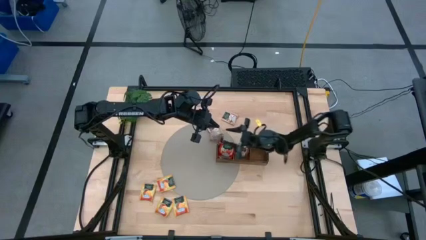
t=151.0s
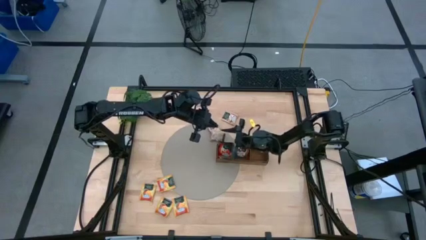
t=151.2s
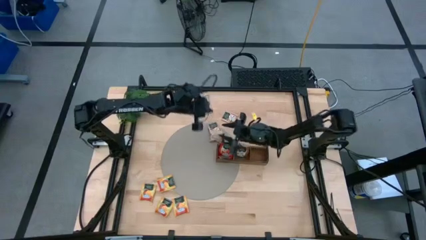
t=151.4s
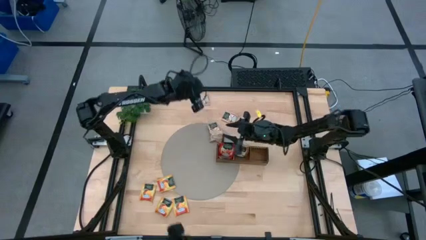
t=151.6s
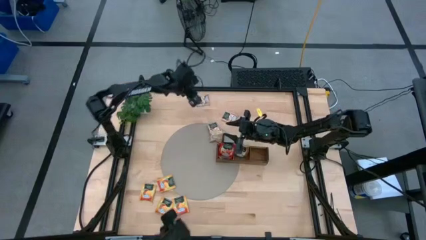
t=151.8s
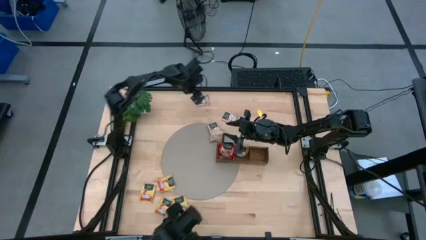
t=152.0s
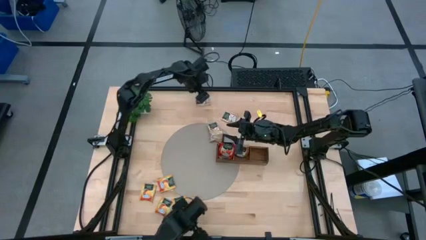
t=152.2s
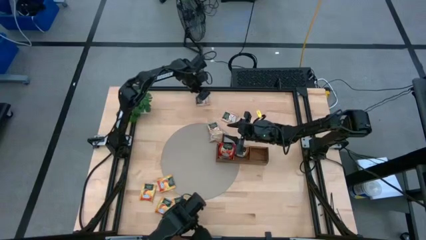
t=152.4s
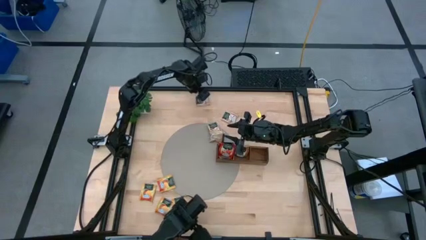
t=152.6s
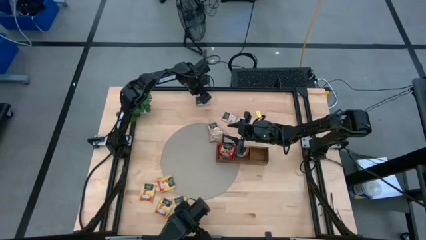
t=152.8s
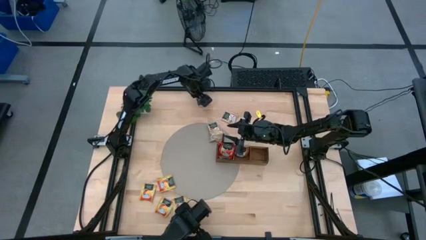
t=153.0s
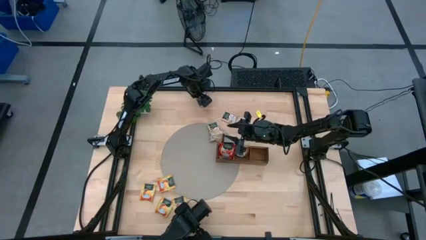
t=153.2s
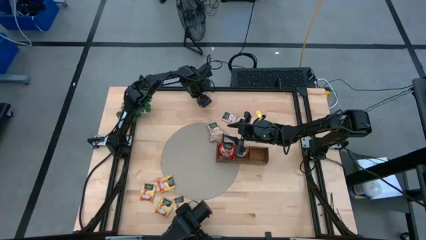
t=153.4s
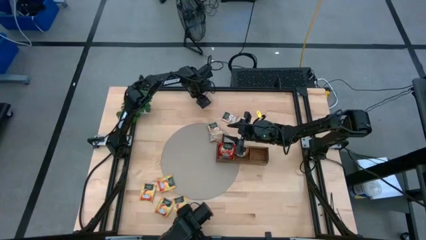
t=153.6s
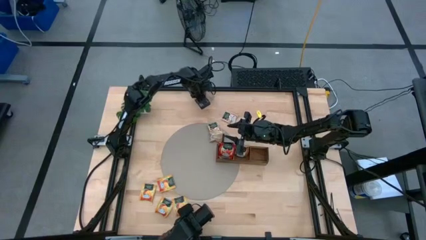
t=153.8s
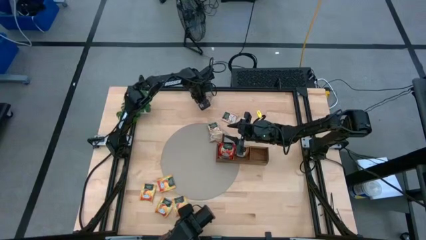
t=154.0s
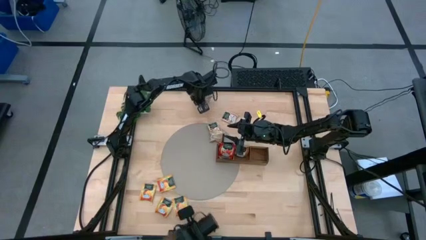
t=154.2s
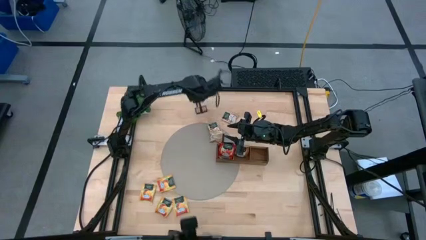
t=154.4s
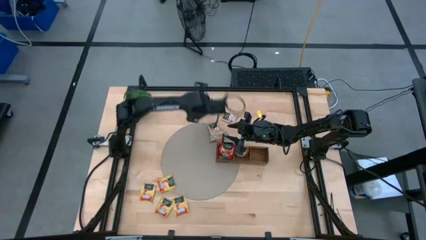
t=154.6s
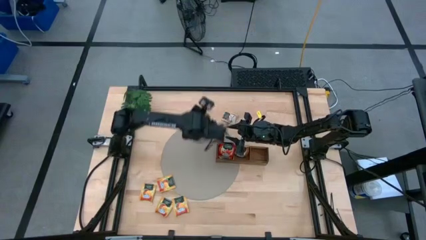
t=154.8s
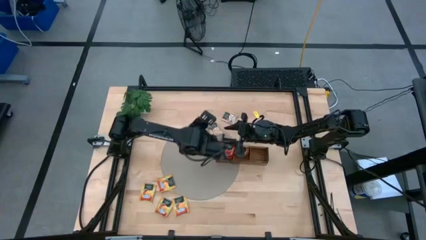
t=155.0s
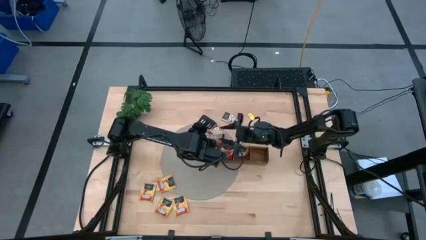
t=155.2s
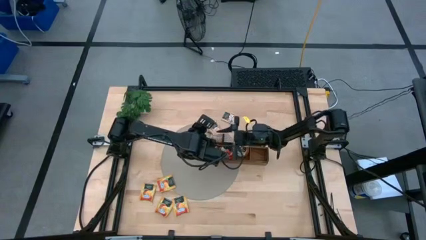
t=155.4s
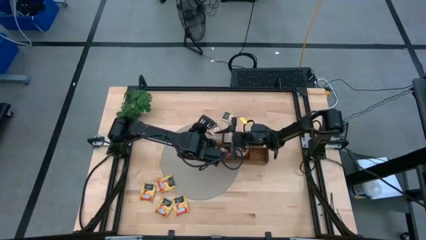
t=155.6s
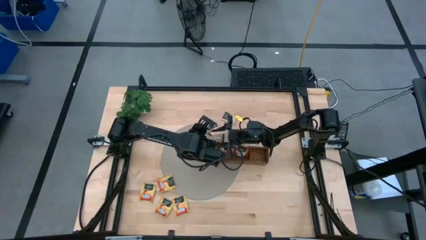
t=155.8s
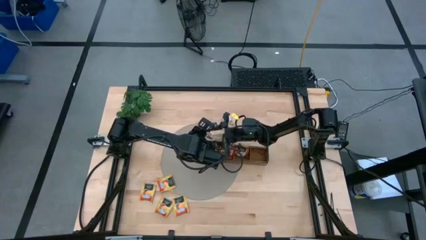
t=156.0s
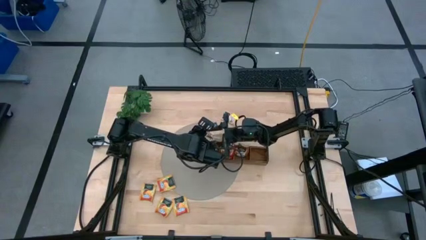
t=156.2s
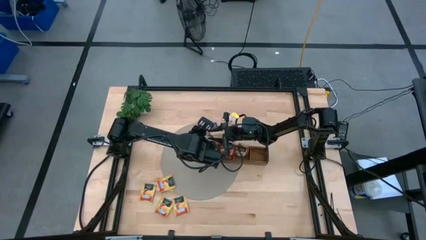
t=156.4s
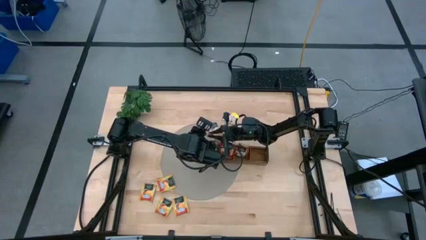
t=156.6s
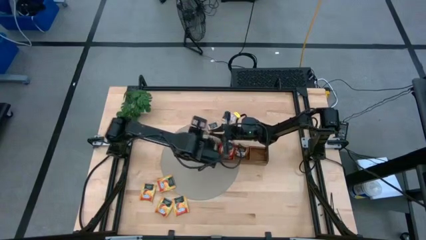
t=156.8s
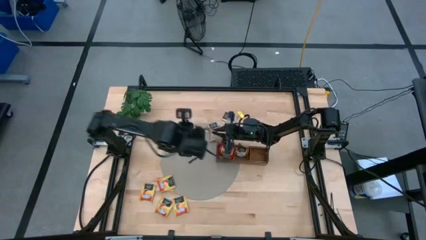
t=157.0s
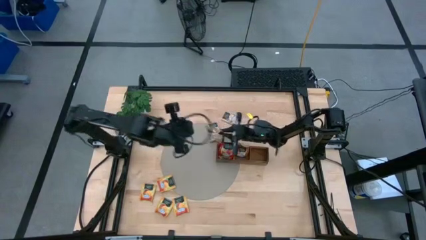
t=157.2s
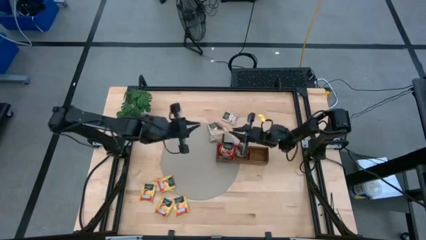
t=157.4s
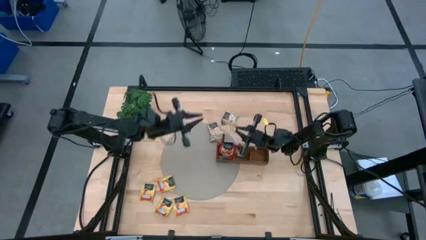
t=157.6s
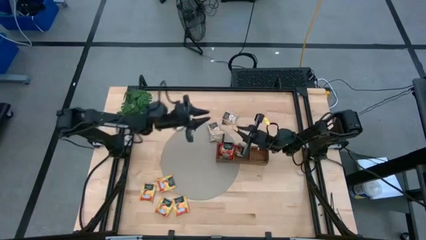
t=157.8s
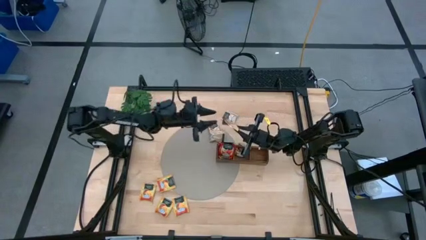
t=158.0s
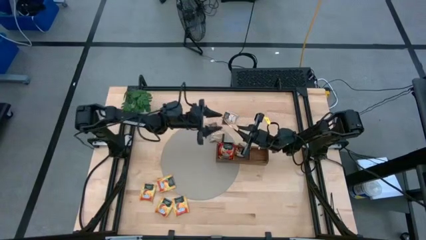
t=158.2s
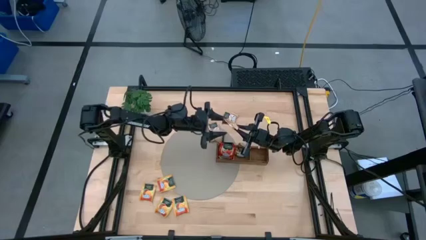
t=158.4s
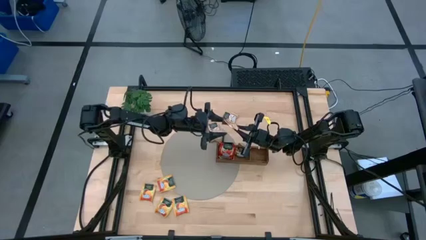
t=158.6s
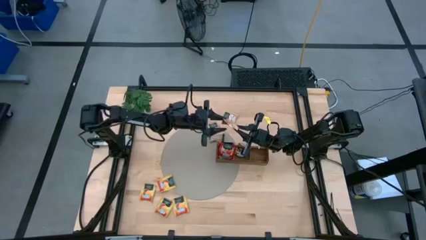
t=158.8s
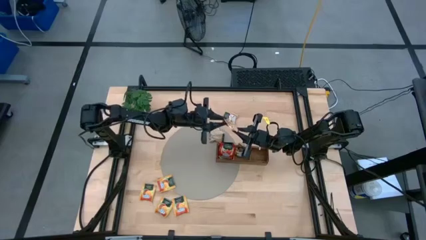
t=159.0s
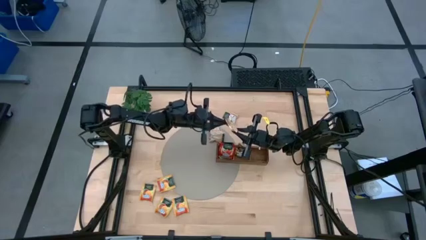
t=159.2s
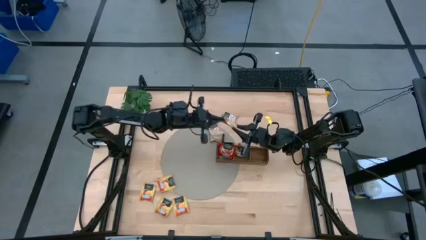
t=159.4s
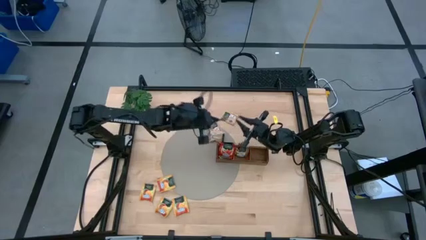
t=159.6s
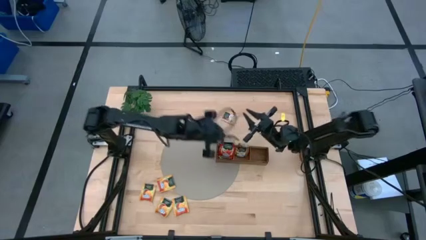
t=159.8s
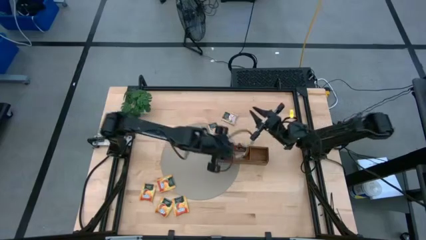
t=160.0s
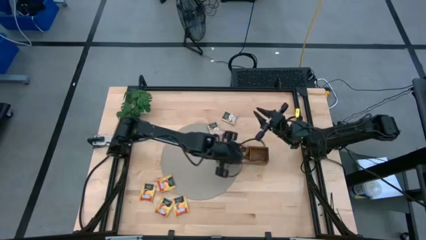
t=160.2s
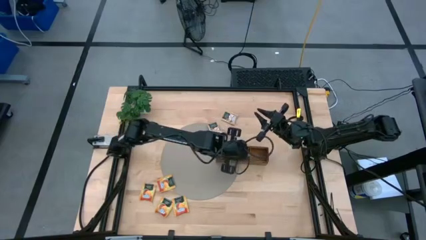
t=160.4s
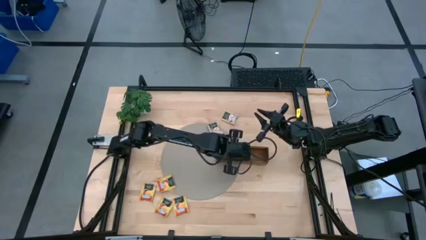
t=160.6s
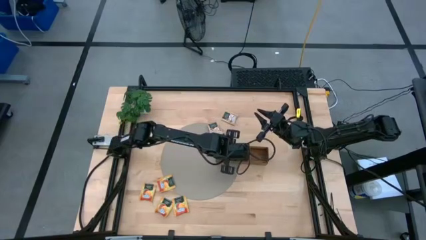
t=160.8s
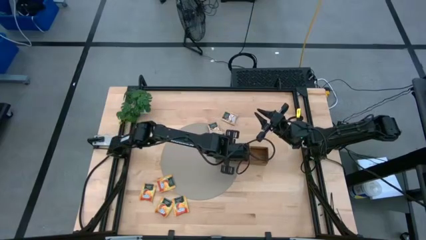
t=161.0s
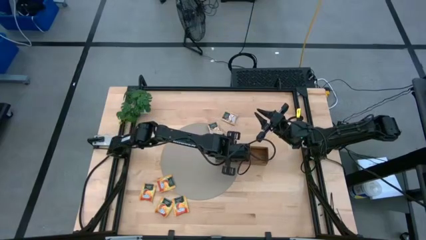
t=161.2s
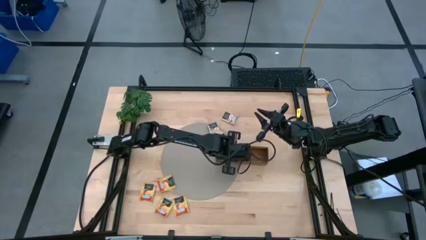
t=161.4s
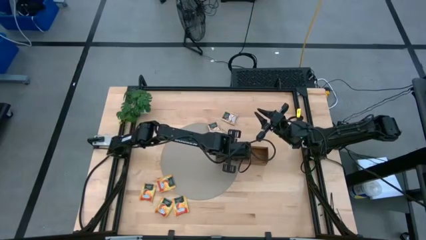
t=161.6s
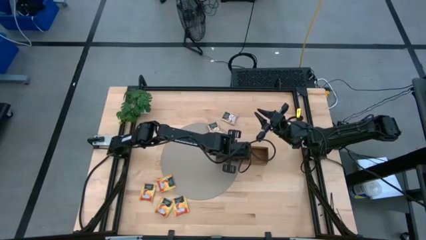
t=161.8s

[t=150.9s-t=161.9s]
Task: Pick & Place Tea
Put the brown tea bag into the middle section of the wooden organizer

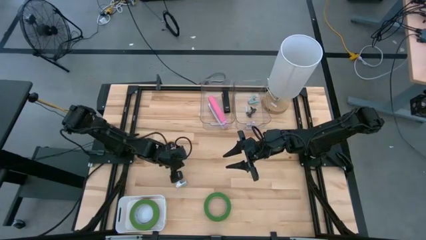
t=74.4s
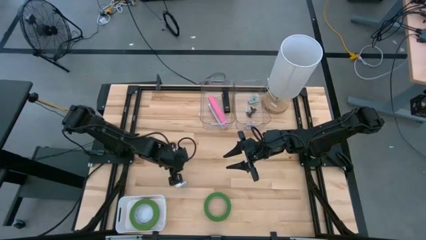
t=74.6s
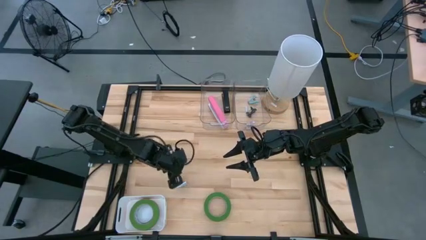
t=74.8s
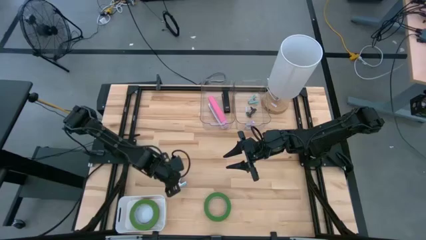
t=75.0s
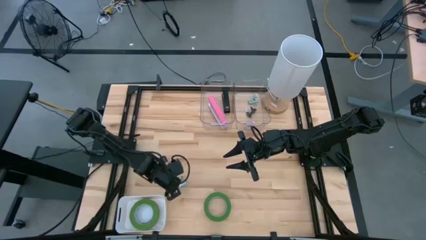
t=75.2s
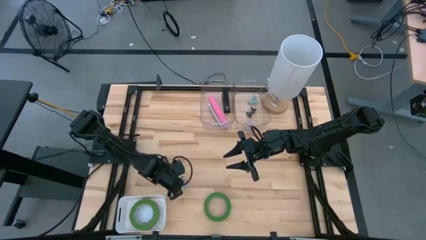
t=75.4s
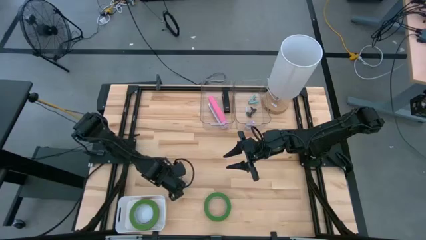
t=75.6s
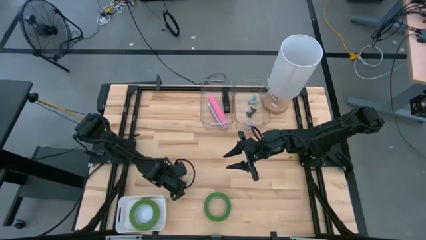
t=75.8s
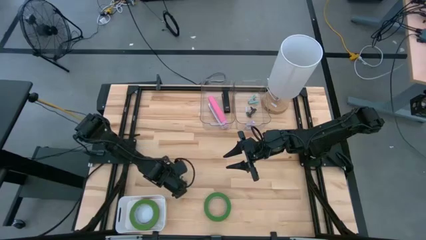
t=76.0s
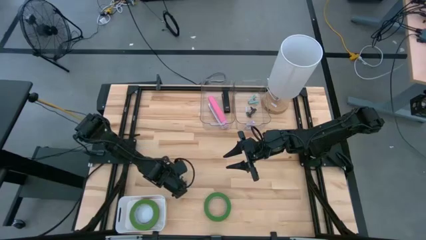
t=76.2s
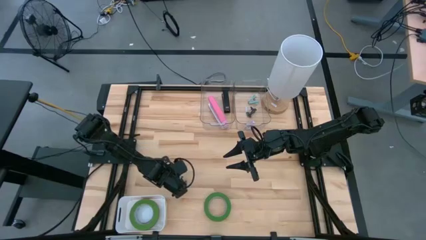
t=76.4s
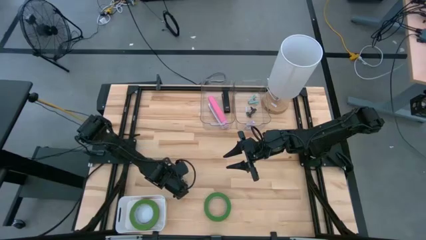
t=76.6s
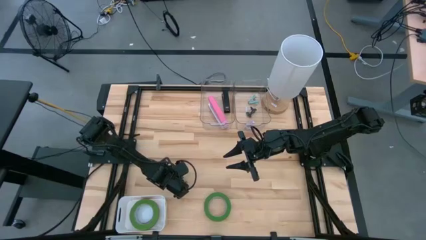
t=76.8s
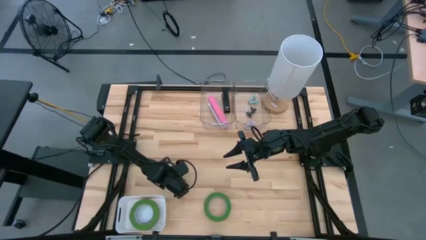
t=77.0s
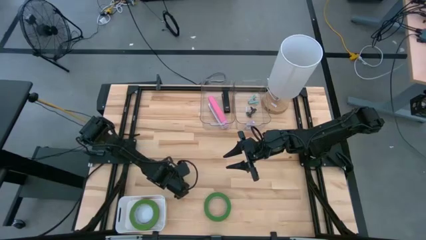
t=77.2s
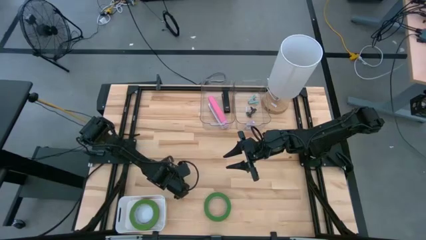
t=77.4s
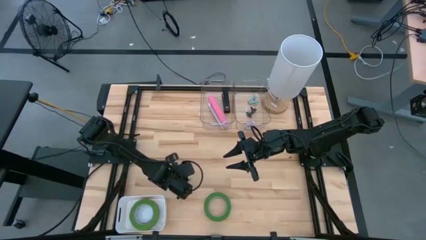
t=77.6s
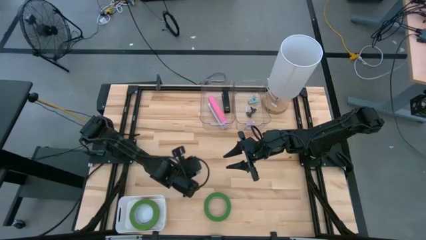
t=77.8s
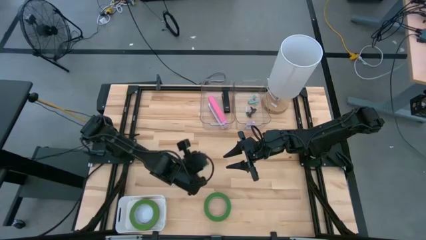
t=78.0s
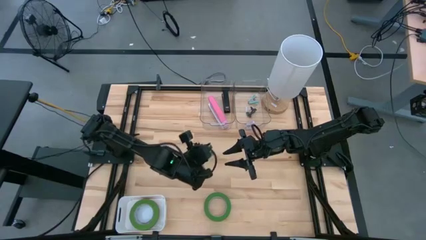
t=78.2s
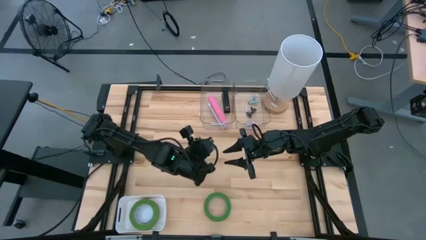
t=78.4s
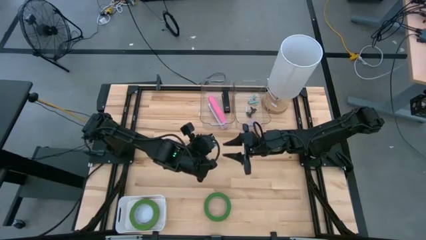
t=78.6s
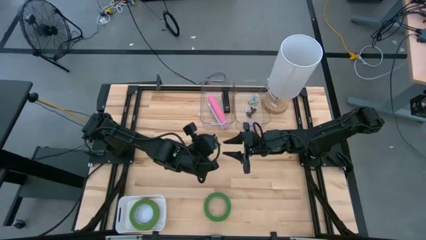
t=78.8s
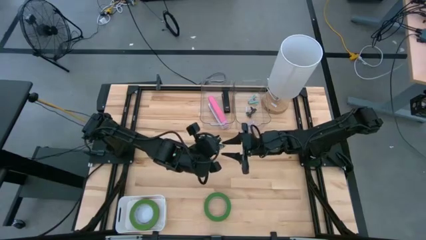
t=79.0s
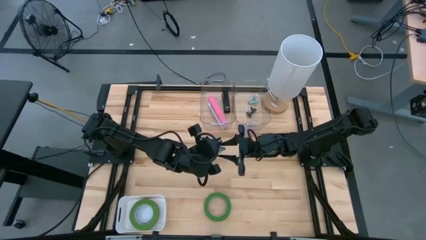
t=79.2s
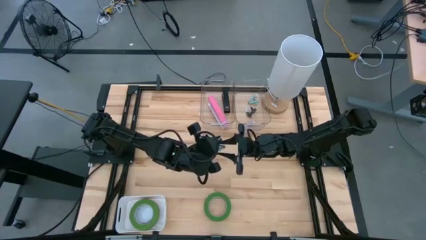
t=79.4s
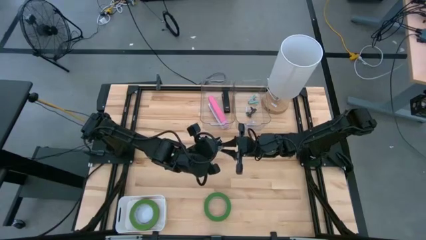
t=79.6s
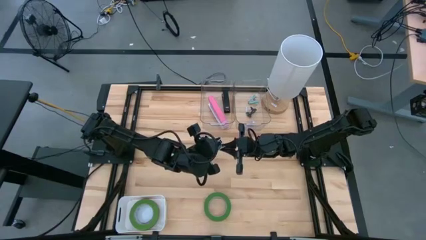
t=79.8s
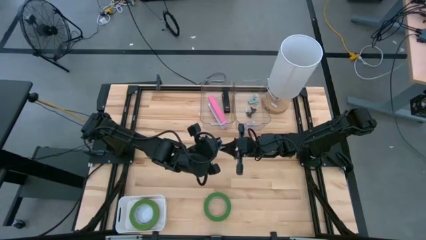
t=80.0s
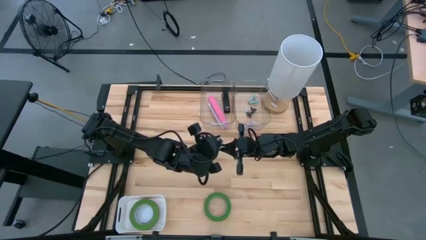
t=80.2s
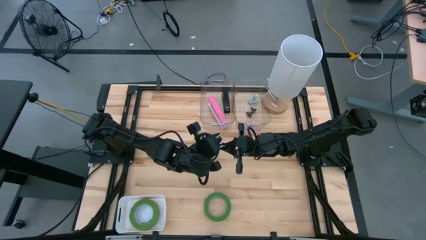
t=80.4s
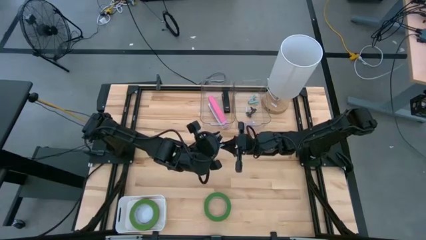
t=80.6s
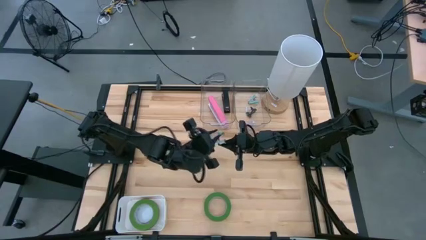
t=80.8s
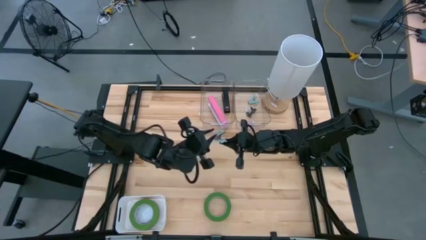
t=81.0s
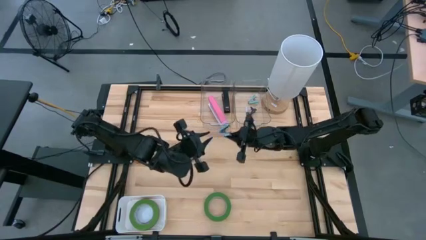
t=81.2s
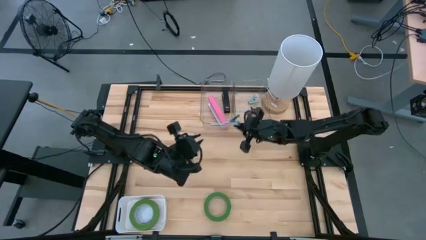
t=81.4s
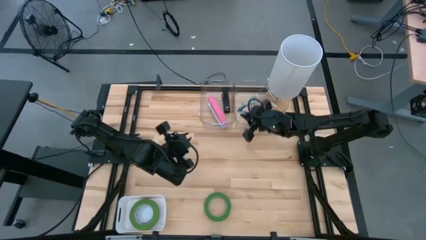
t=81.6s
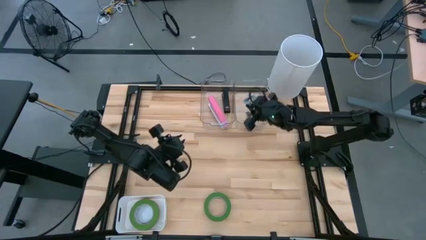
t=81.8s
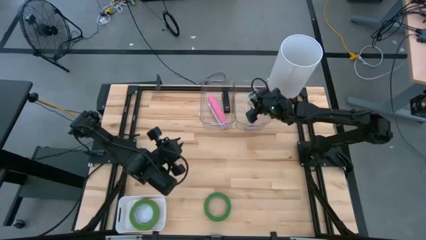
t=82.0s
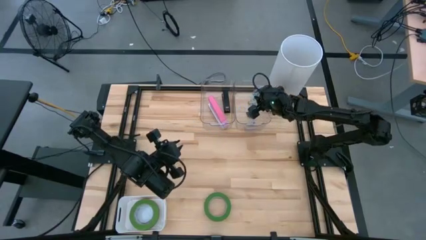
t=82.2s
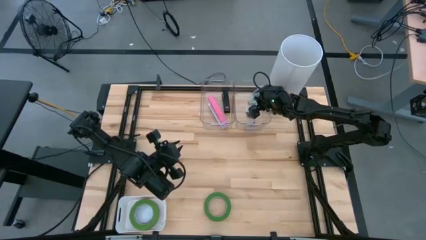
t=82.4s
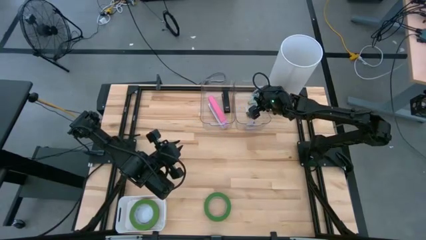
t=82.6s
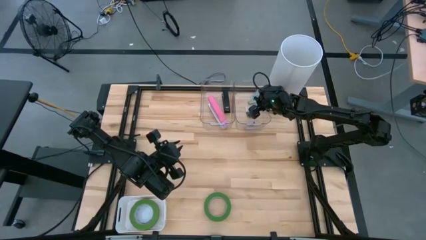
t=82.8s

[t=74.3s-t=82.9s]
Task: Pick and place Stapler, Stapler remover, tape
Put the blue staple remover into the right transparent bin
